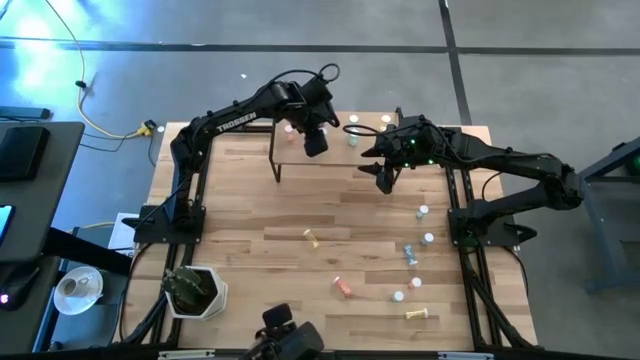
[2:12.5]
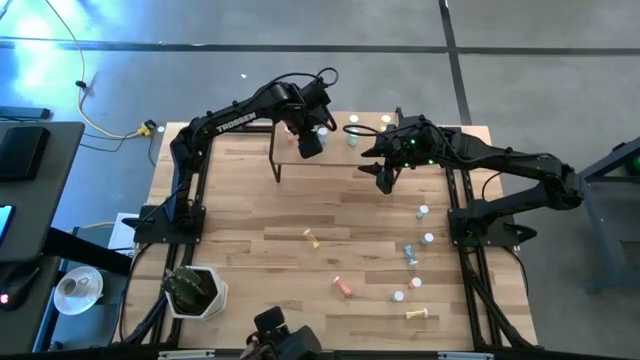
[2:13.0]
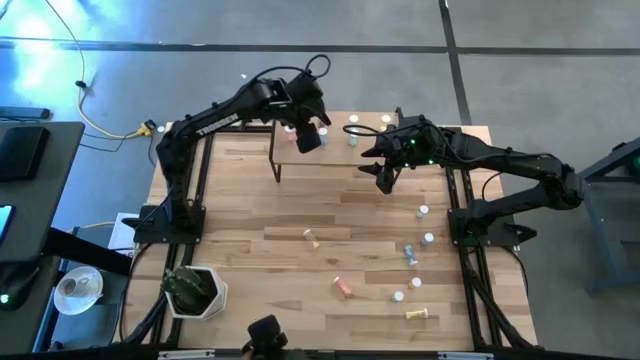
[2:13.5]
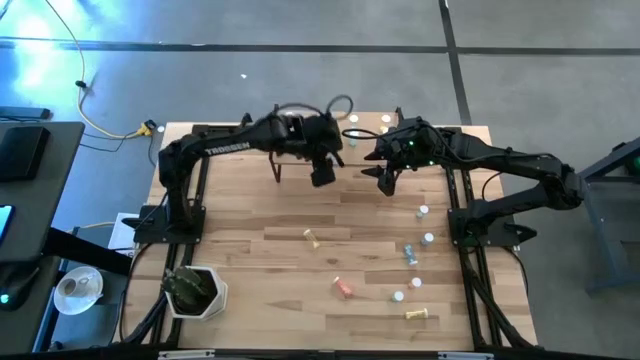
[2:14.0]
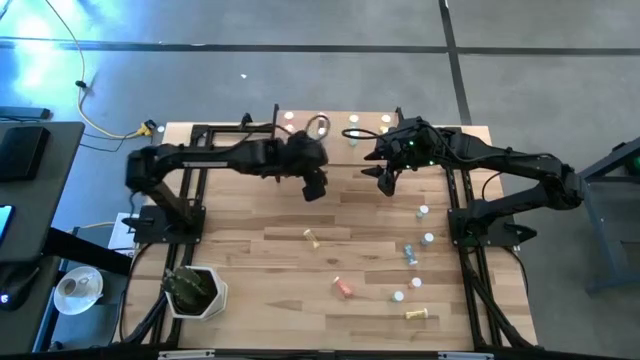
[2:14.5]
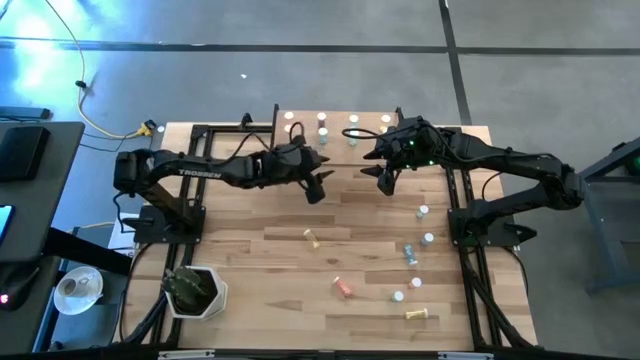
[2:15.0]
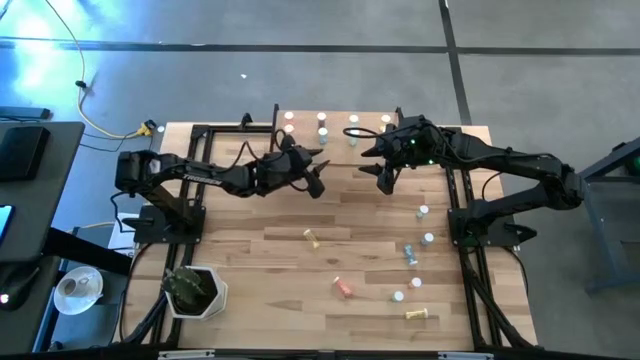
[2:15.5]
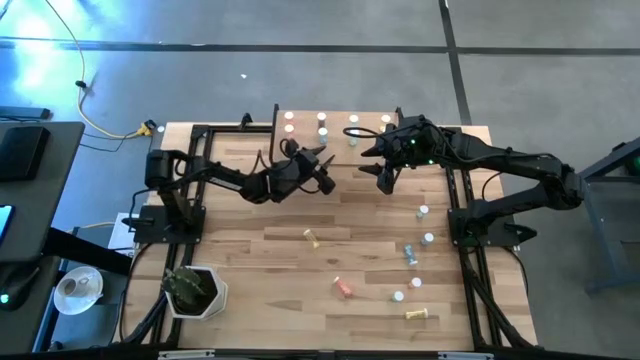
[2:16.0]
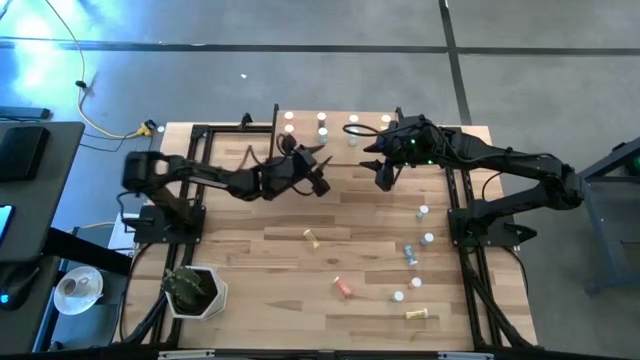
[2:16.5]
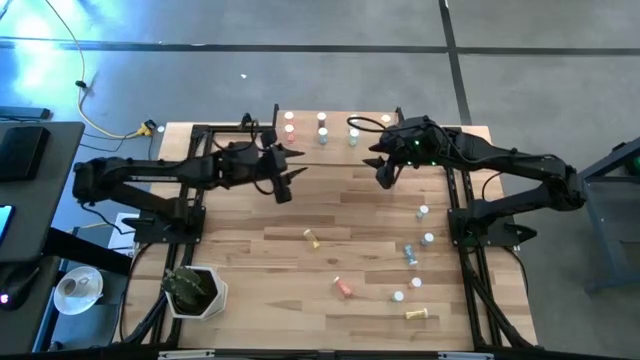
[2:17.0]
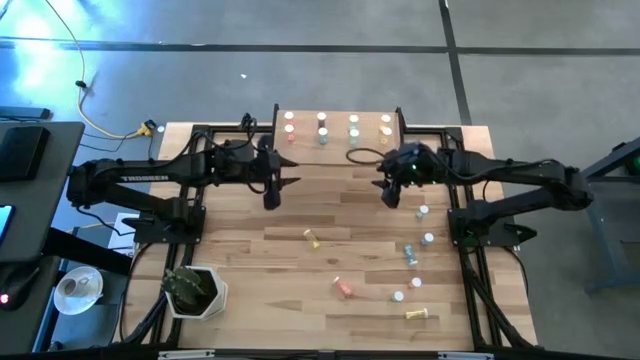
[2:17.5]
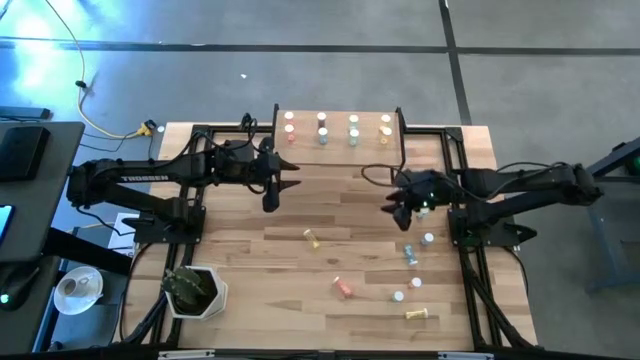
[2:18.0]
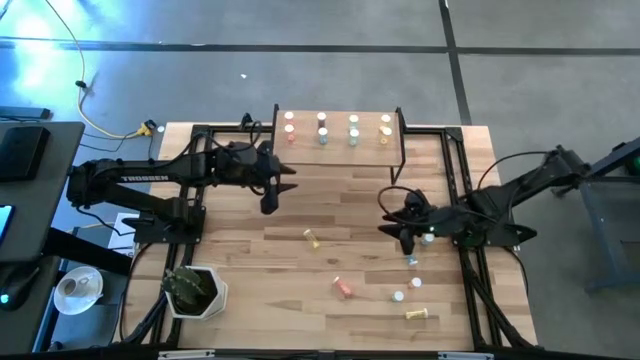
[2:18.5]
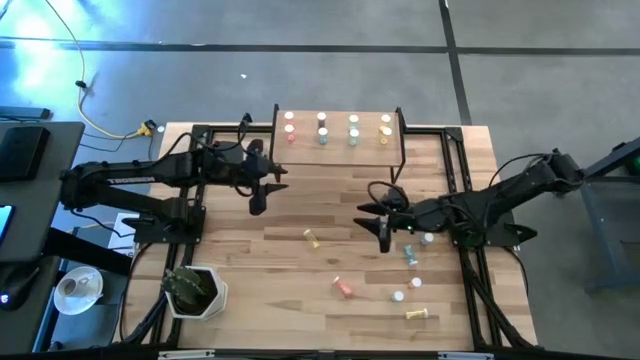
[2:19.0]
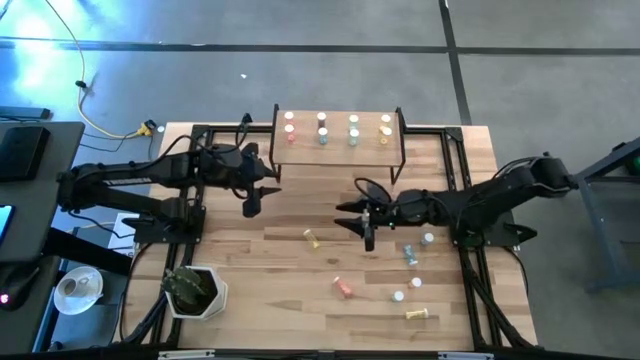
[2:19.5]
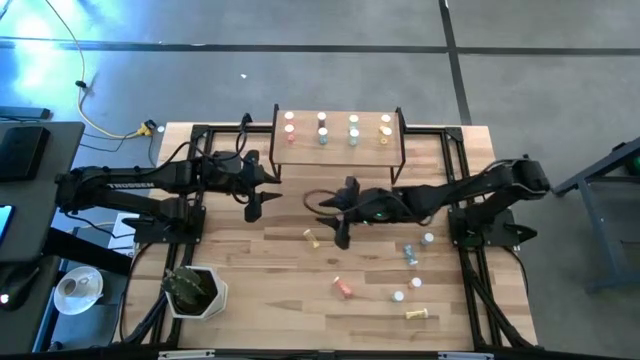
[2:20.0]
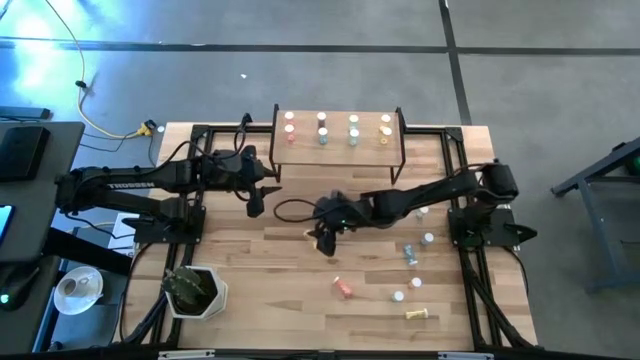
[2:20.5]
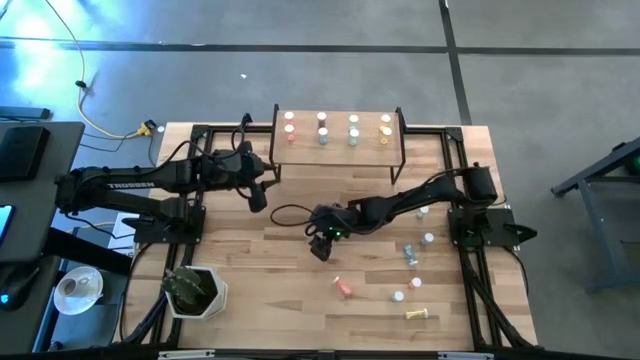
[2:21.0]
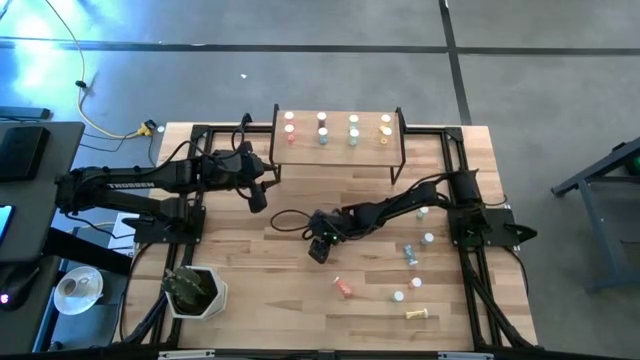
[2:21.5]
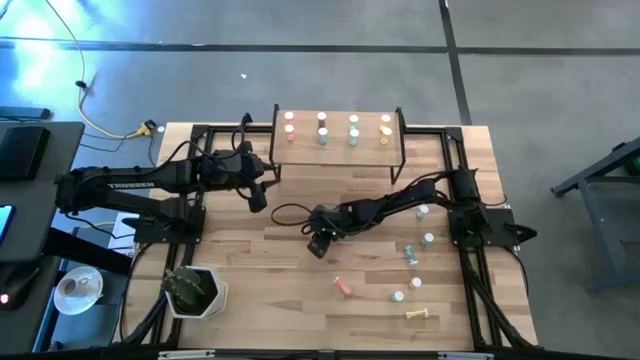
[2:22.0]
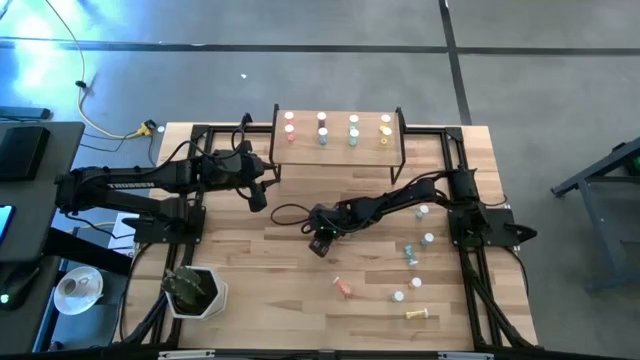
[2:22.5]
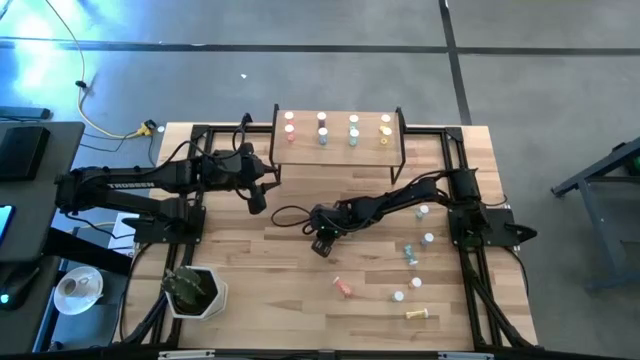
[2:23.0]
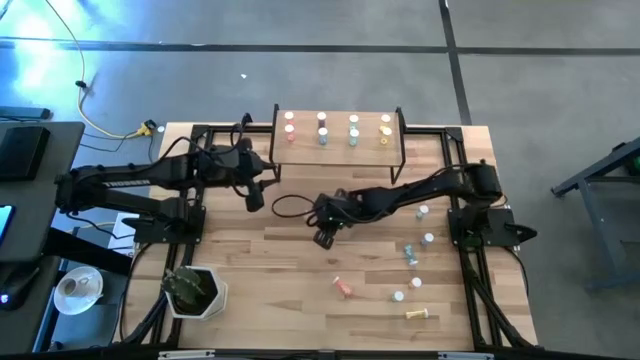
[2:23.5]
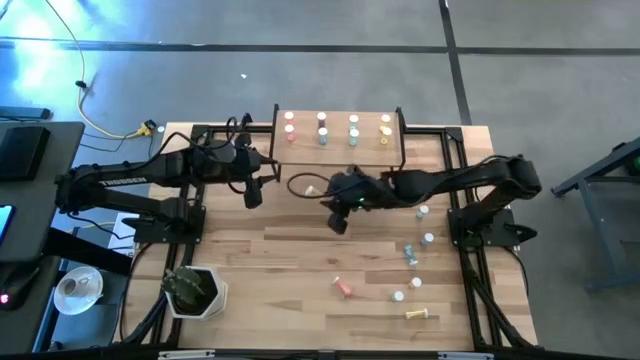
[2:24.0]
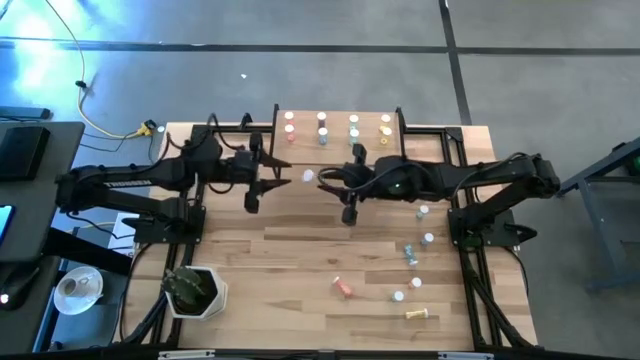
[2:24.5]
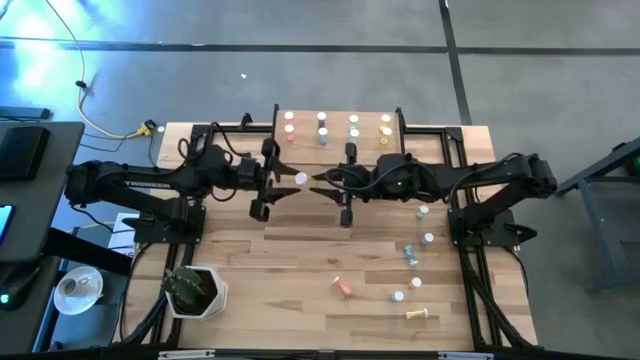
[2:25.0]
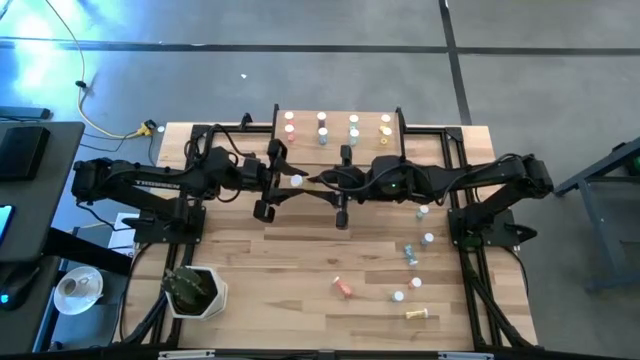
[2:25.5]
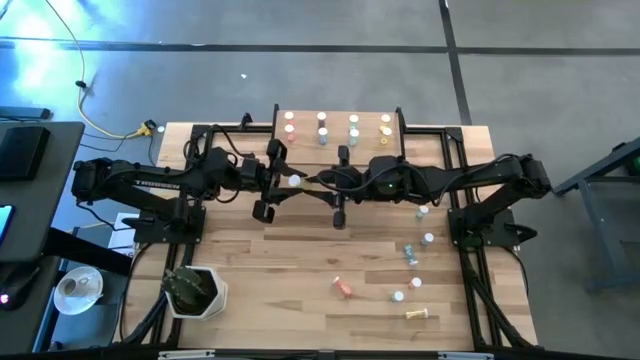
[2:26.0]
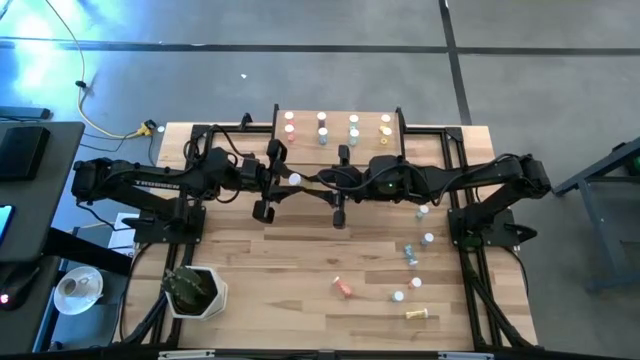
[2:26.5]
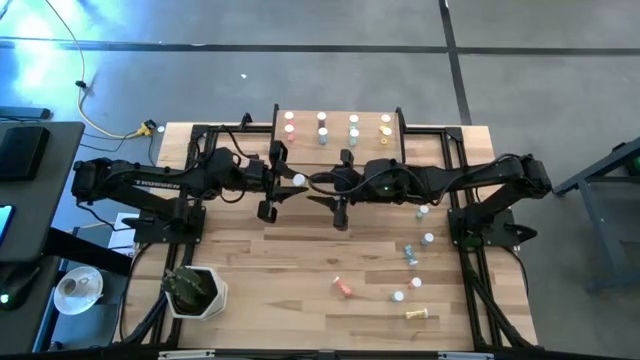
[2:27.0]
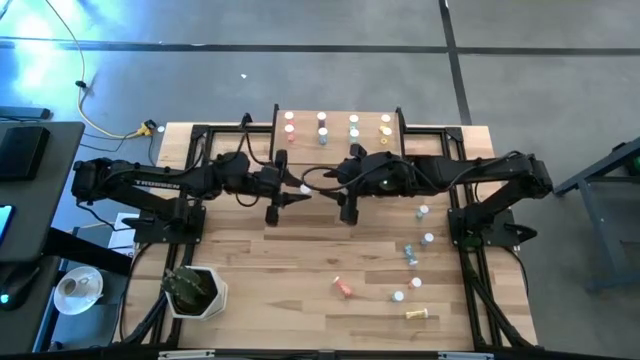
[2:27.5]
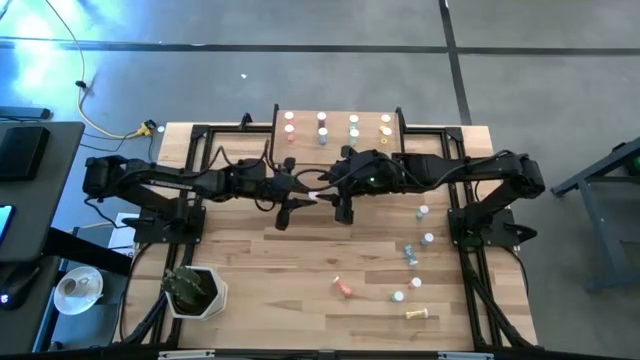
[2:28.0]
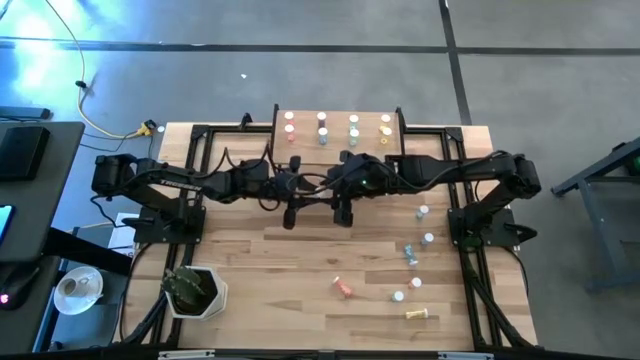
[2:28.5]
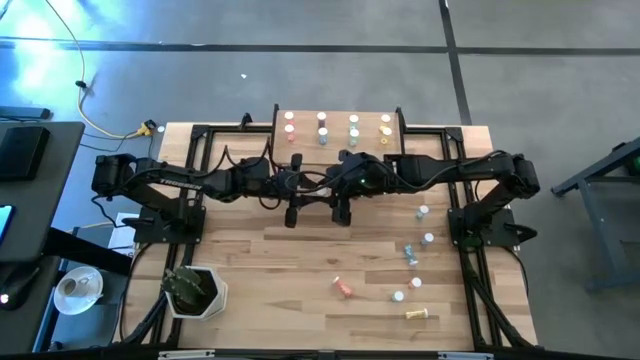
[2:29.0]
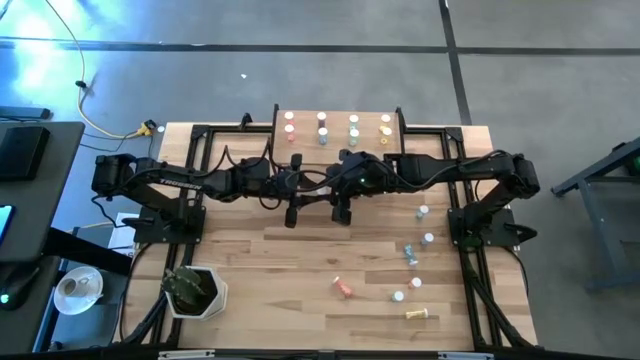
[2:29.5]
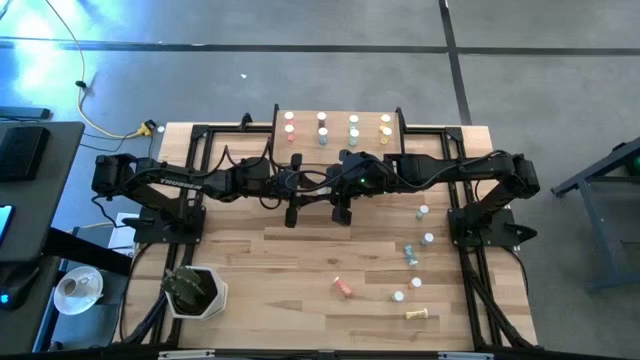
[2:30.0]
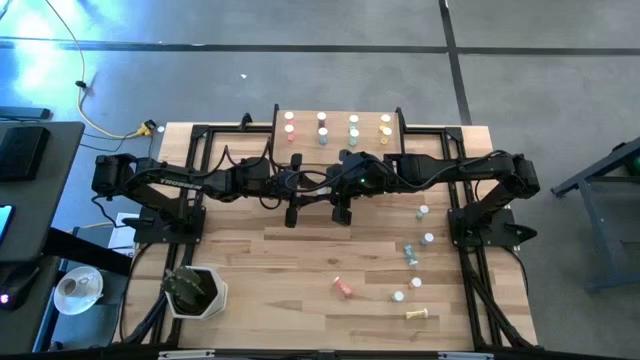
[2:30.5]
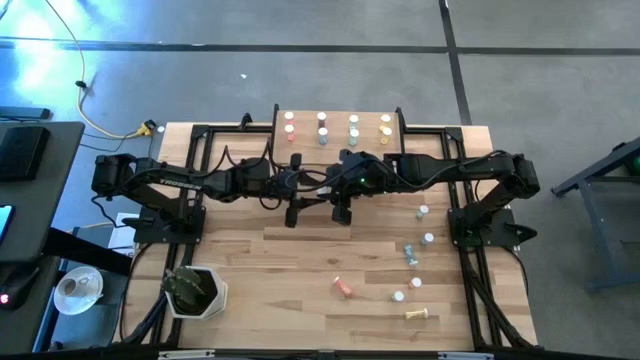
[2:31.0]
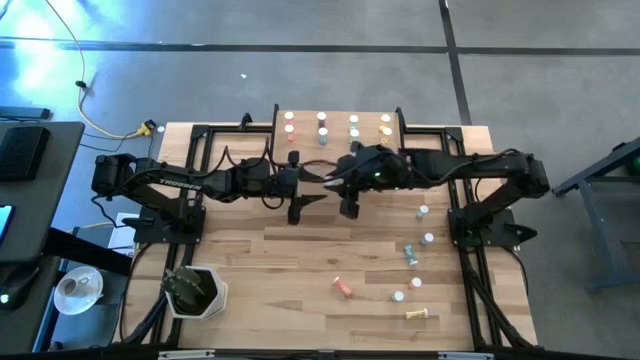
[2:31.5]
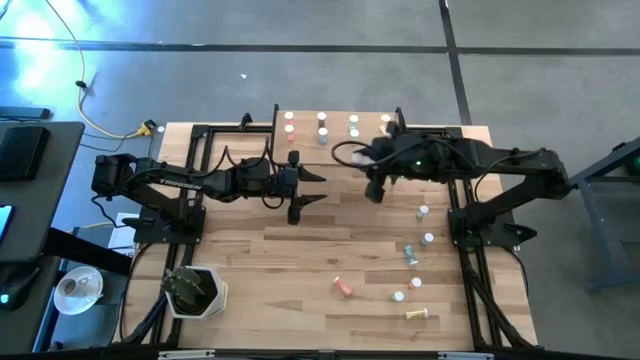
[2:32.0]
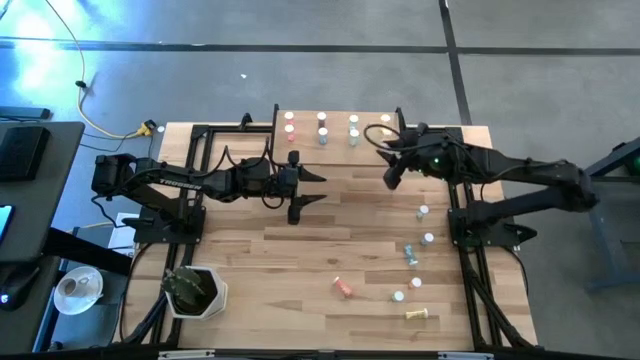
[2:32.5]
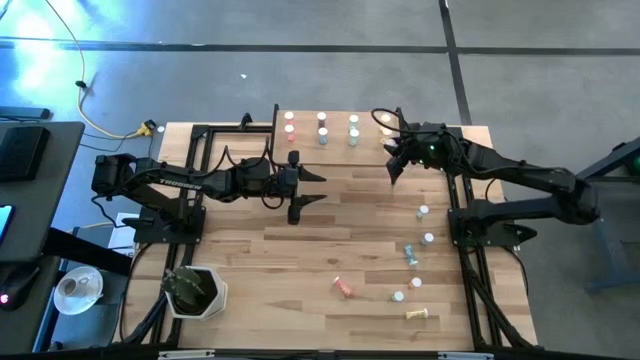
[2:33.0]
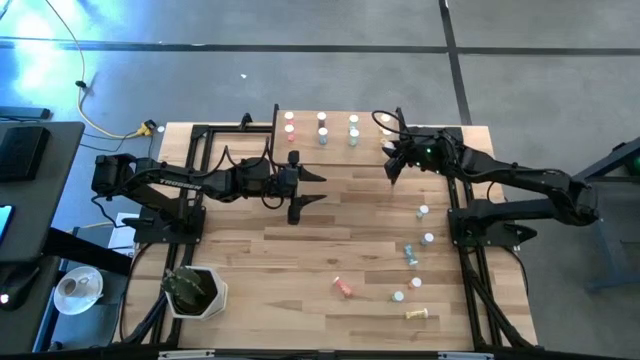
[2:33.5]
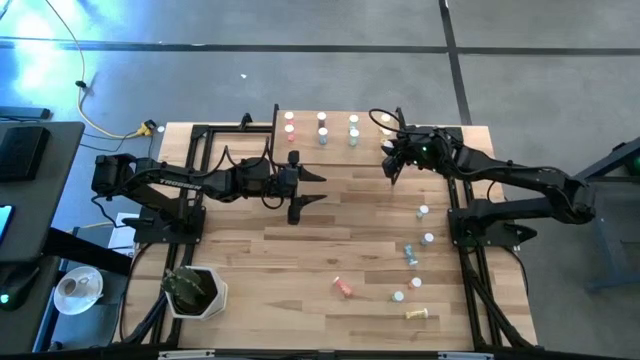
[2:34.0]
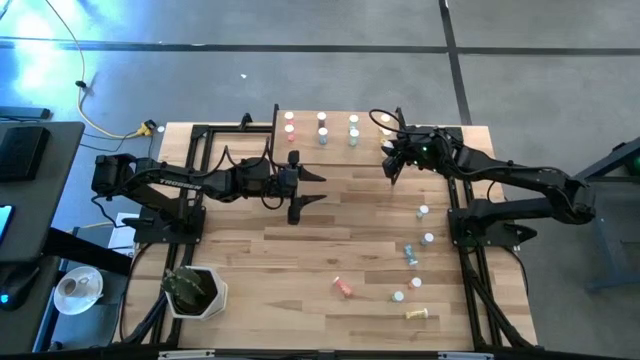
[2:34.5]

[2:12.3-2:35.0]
Task: Pick and place medicine bottles onto shelf by color
Put the yellow pill bottle on the shelf aligned with the other yellow pill bottles
